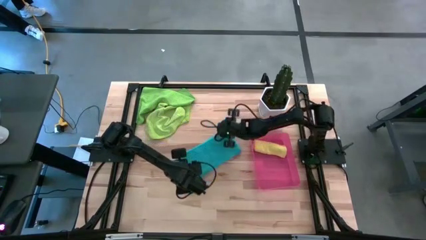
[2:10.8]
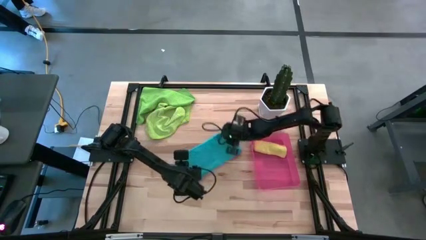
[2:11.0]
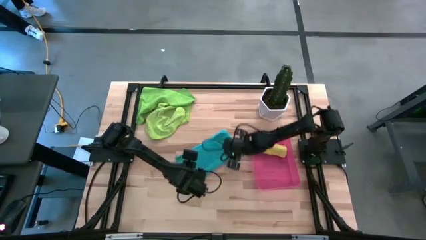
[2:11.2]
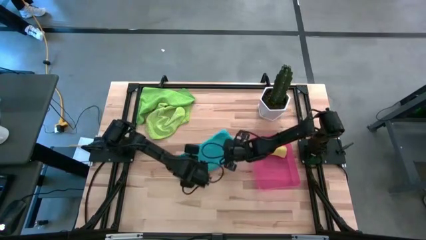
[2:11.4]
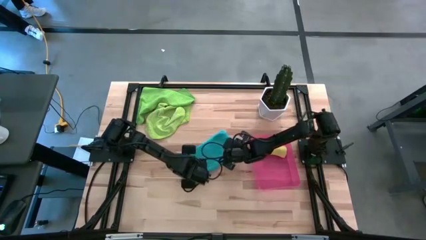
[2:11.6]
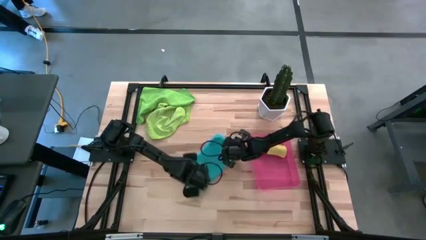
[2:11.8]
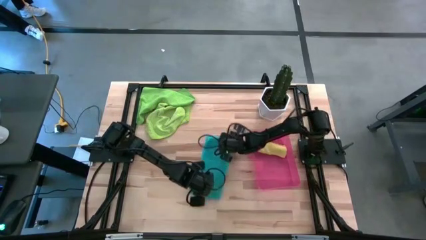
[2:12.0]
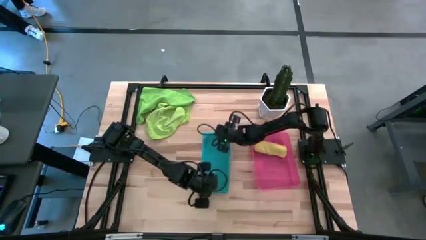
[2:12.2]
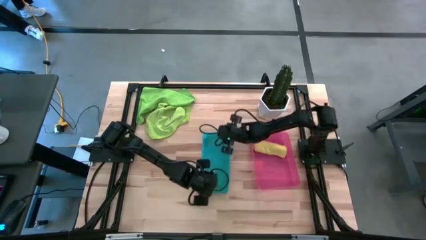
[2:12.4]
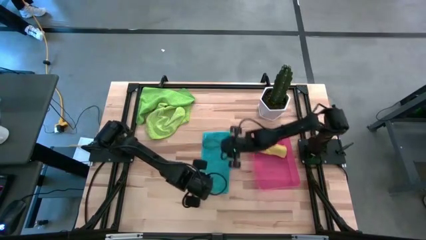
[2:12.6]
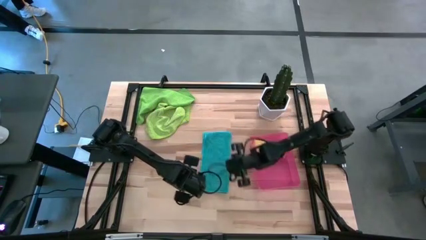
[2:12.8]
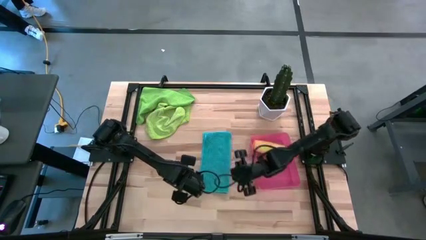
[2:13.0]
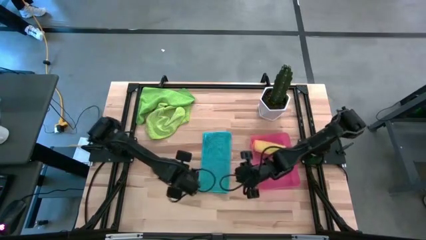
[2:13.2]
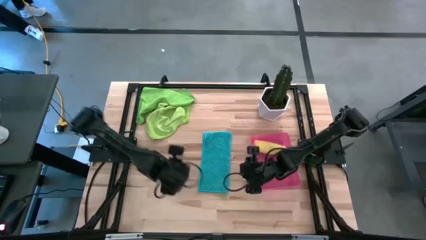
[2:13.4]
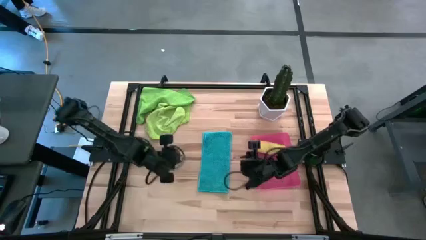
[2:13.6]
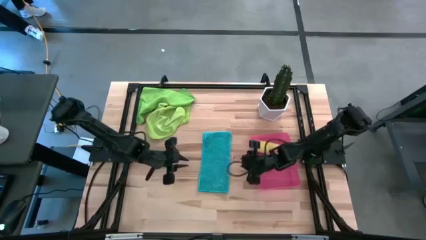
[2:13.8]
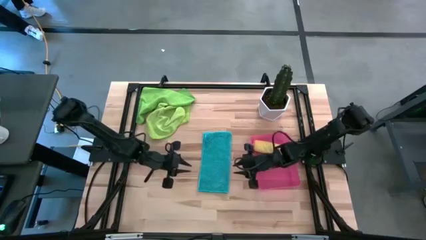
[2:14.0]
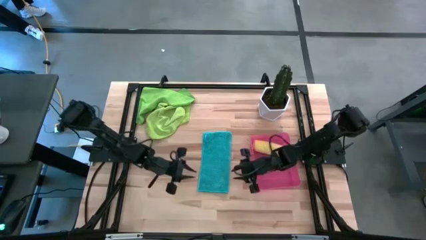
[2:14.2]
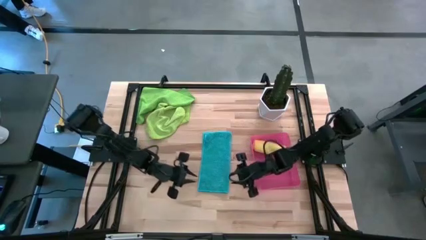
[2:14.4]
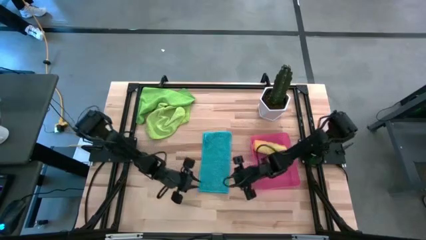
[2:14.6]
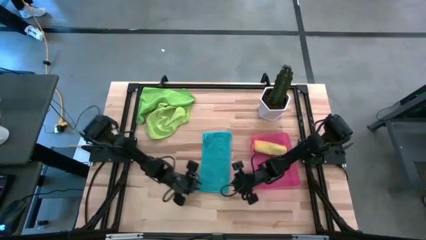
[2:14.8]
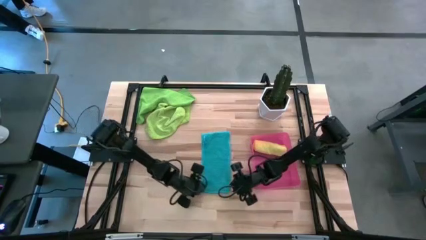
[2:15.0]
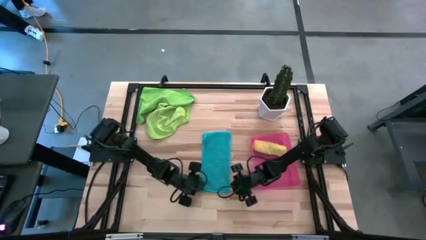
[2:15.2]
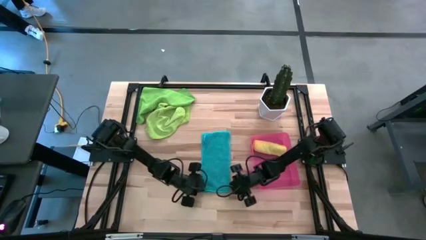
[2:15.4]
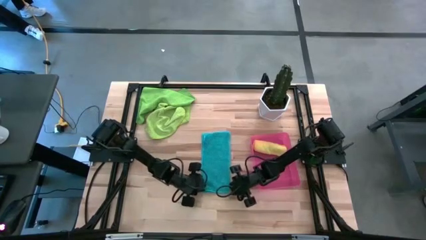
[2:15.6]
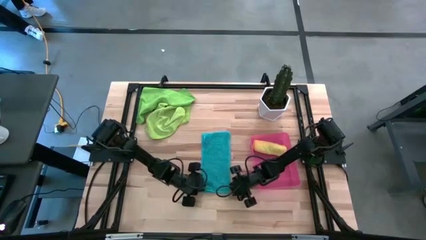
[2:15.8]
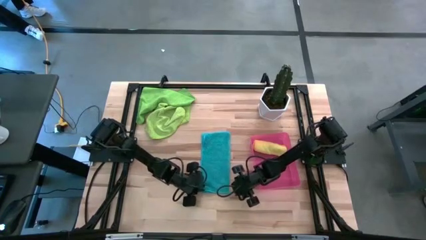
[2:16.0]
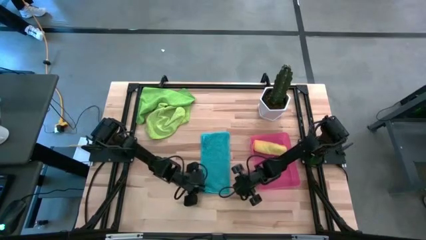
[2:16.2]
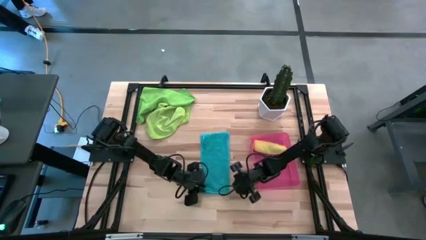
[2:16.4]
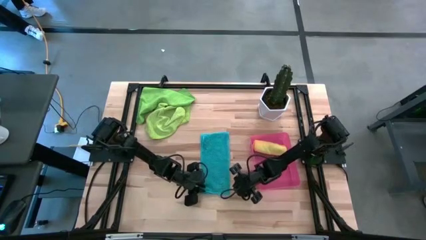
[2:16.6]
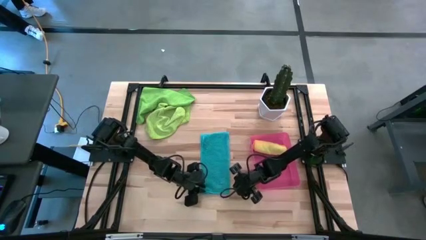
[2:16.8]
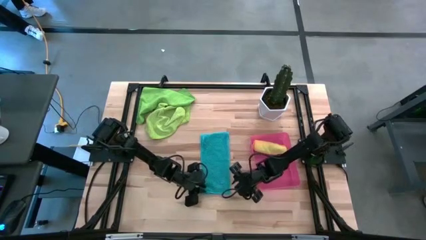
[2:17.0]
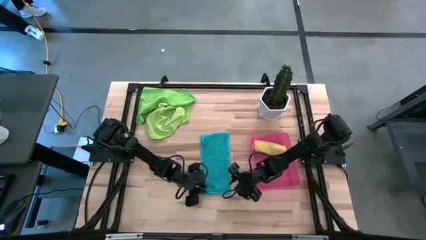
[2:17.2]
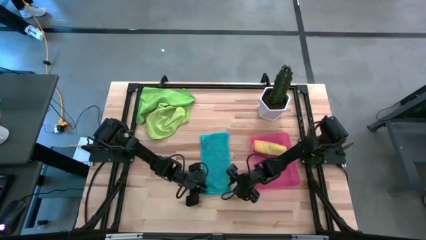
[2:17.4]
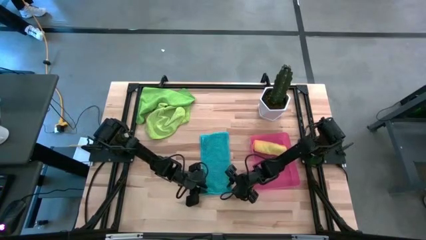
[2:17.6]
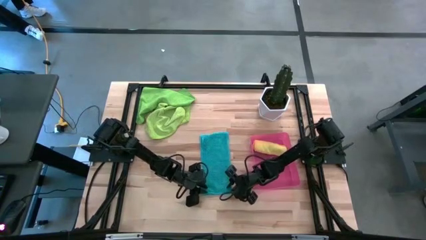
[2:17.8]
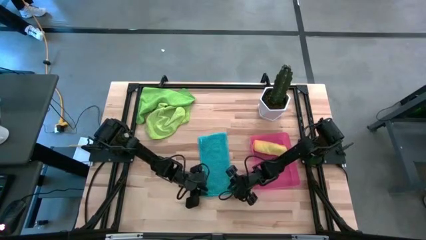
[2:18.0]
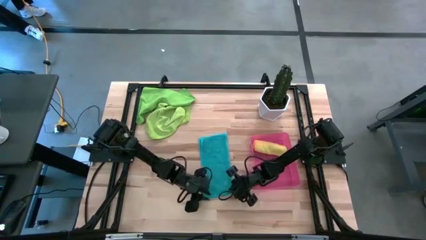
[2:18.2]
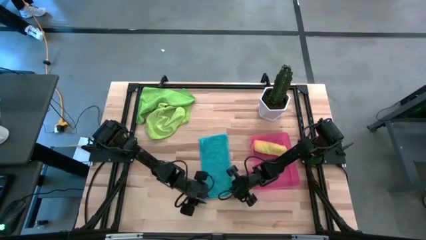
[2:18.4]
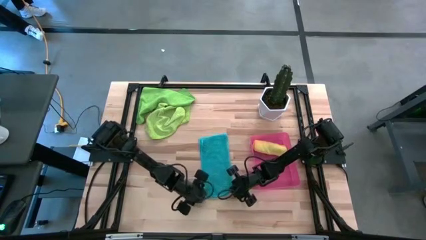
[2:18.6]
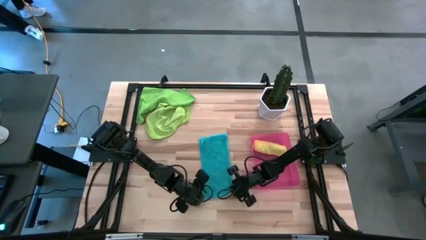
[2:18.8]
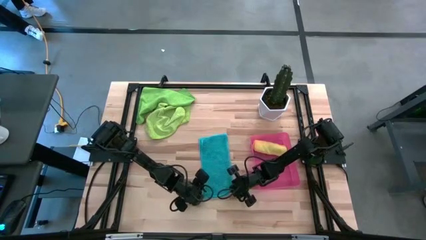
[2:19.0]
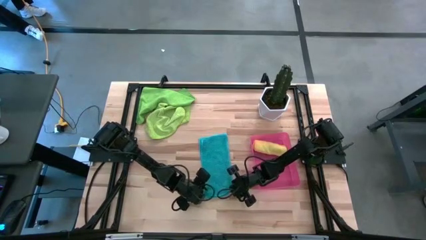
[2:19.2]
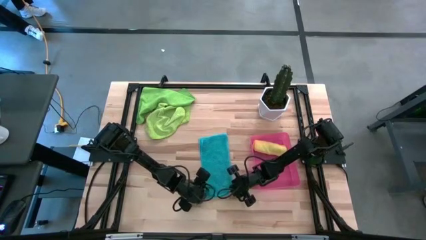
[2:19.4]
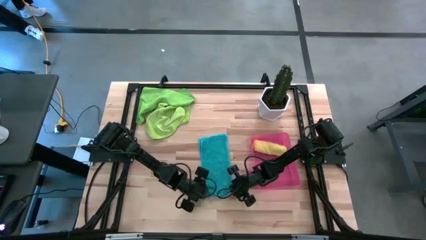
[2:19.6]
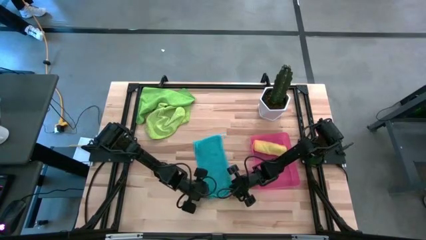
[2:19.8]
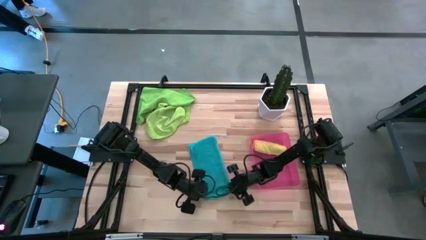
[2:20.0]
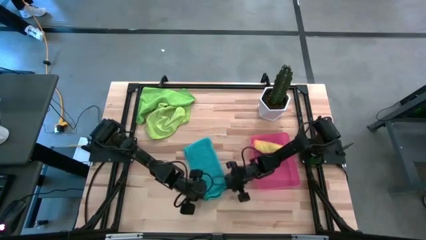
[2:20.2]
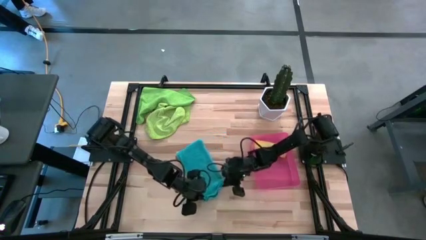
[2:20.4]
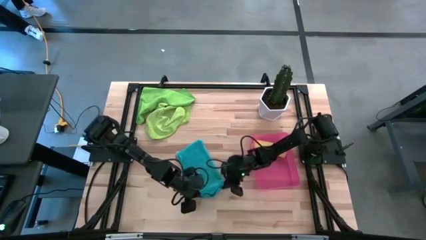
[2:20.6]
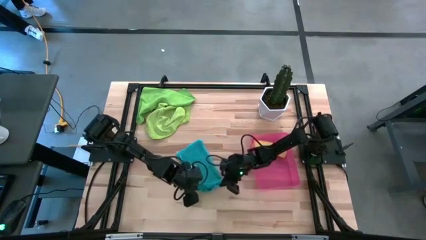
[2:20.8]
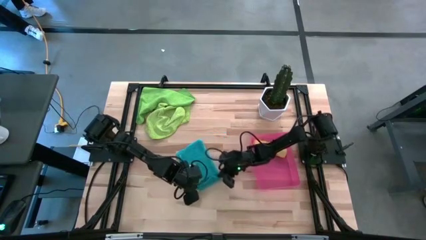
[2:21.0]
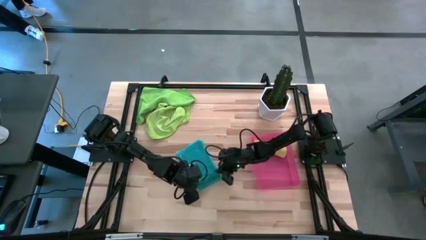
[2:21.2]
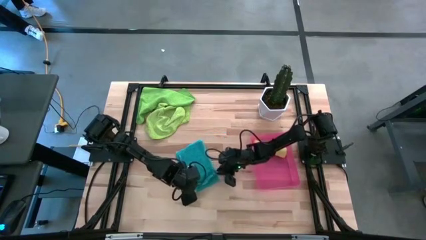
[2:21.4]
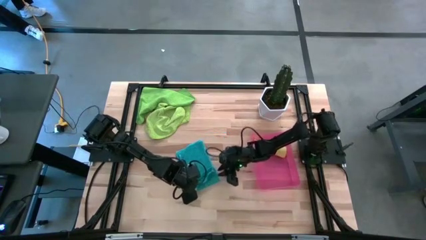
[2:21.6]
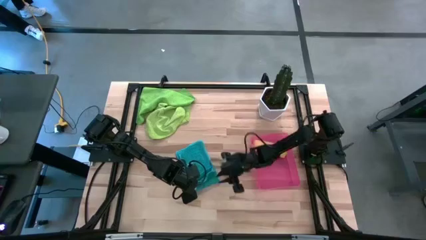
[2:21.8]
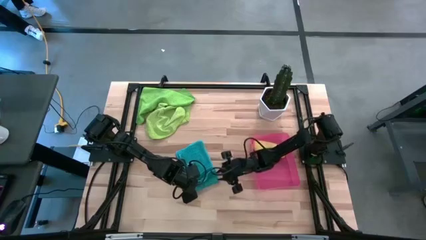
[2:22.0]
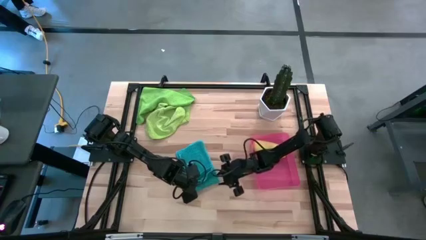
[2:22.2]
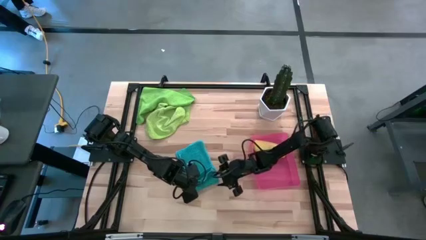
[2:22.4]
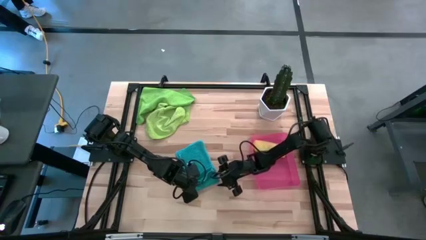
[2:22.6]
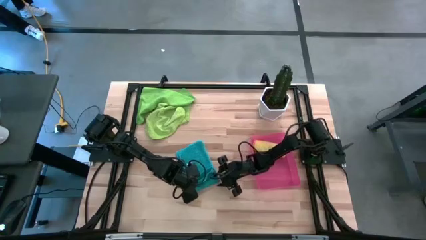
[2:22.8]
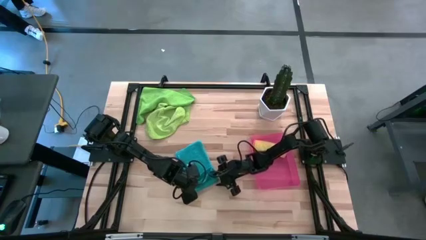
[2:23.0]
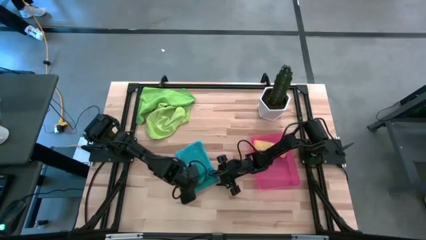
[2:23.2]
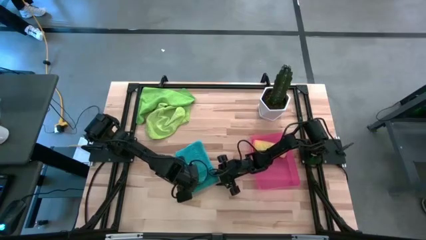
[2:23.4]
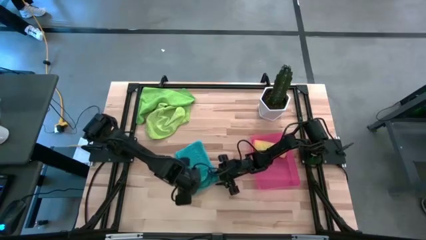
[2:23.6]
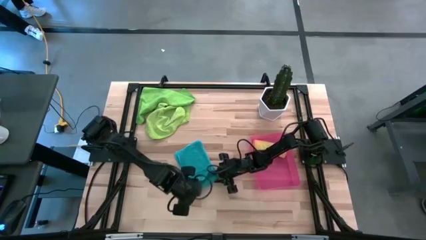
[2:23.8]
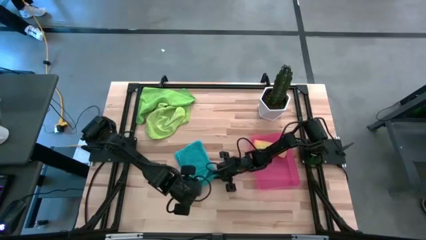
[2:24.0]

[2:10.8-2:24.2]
Task: Roll microfiber towels into tight, uniform cylinder then place into a basket
Roll the blue microfiber towel
